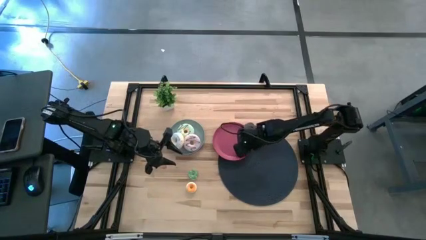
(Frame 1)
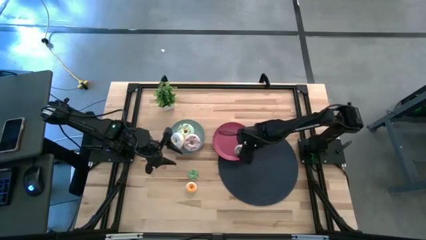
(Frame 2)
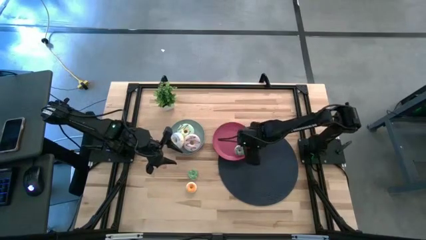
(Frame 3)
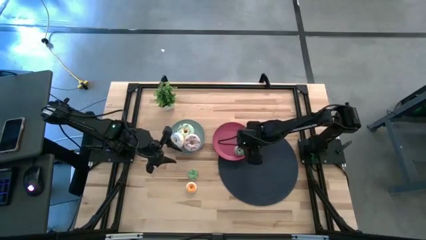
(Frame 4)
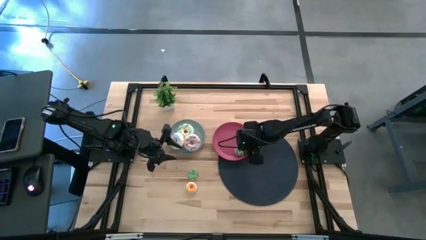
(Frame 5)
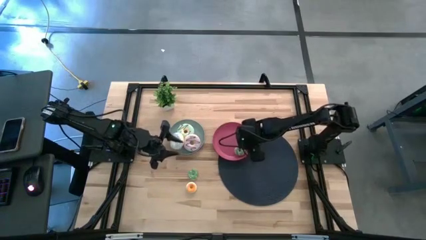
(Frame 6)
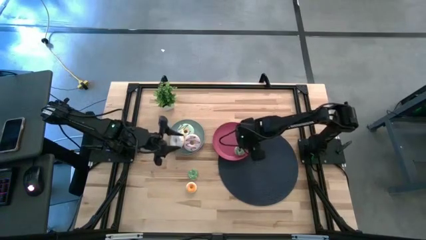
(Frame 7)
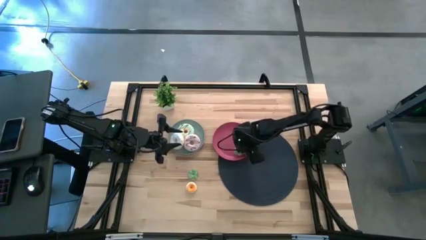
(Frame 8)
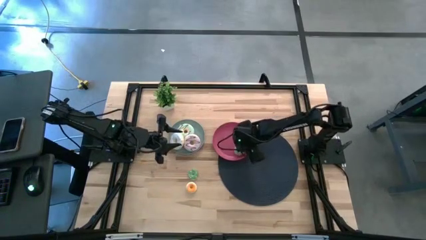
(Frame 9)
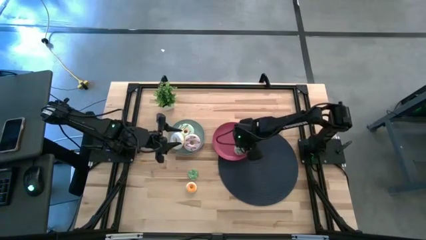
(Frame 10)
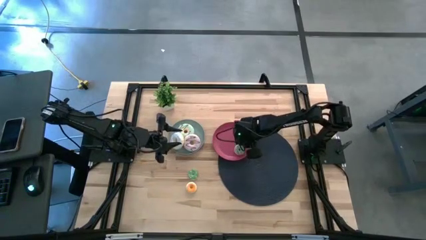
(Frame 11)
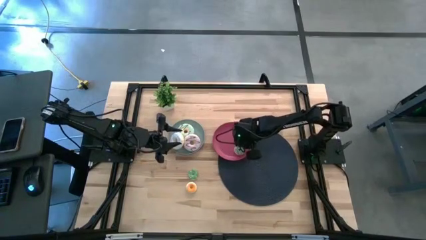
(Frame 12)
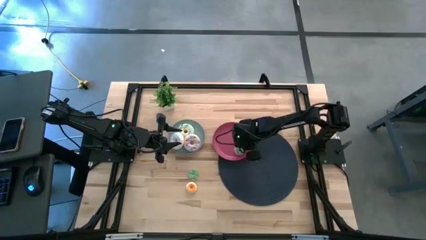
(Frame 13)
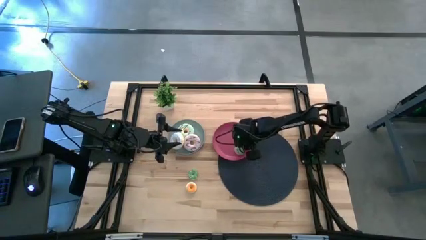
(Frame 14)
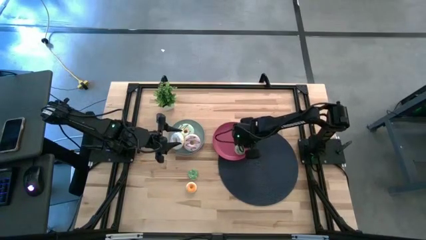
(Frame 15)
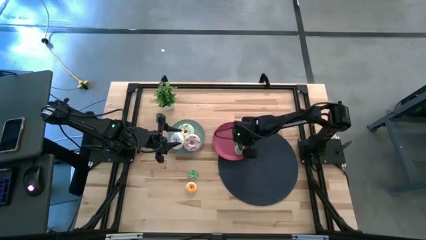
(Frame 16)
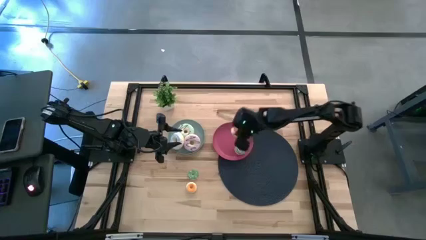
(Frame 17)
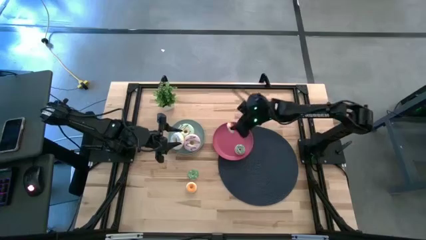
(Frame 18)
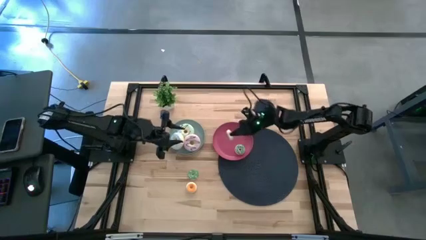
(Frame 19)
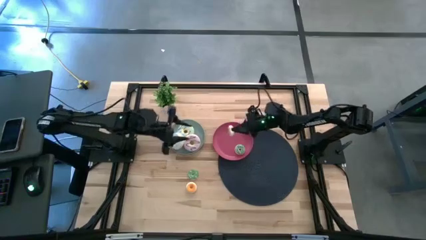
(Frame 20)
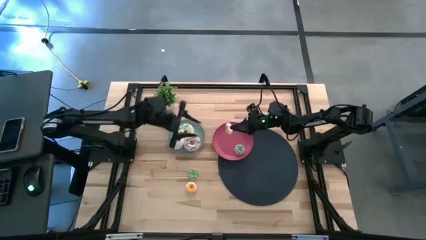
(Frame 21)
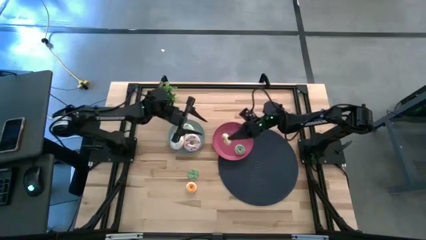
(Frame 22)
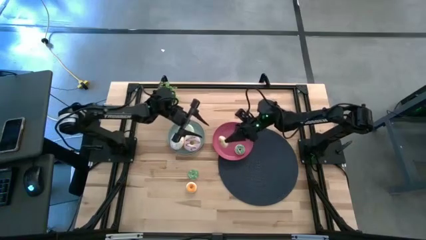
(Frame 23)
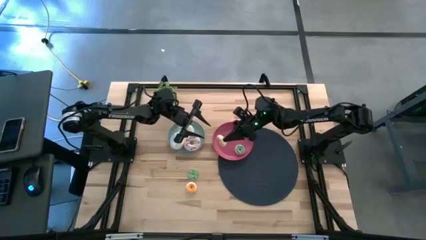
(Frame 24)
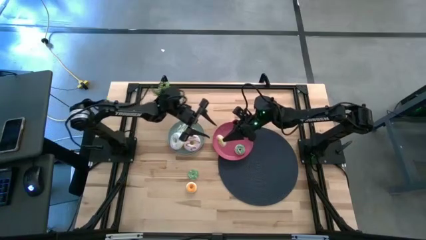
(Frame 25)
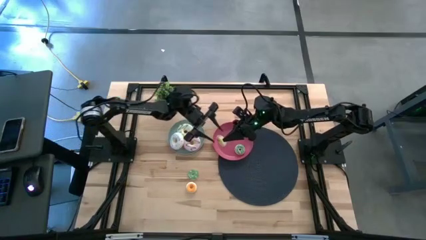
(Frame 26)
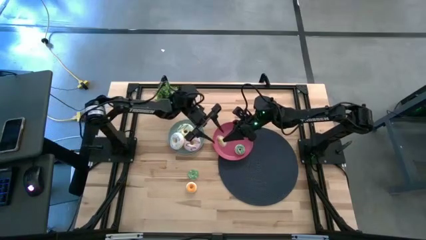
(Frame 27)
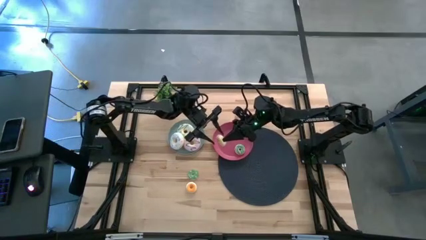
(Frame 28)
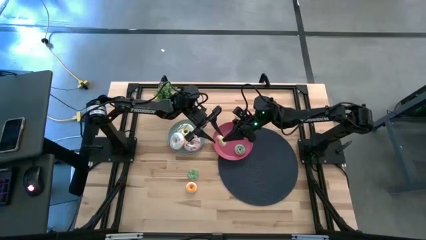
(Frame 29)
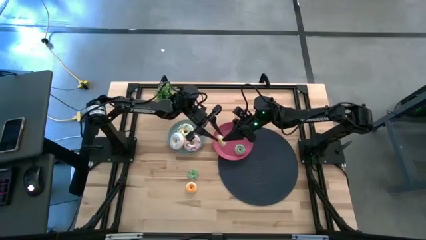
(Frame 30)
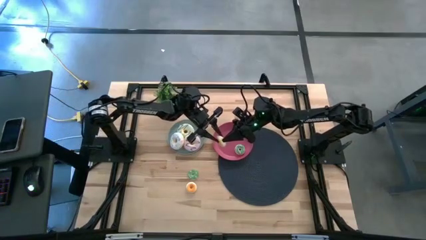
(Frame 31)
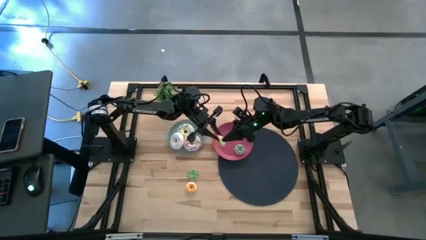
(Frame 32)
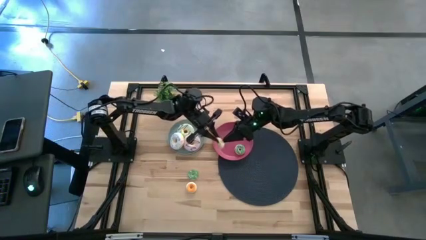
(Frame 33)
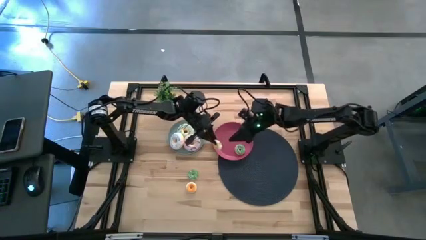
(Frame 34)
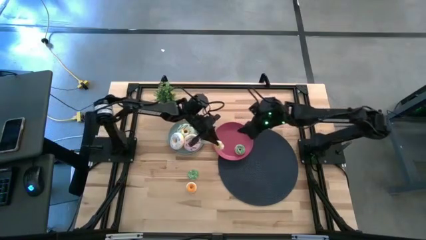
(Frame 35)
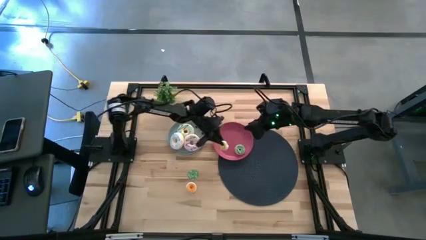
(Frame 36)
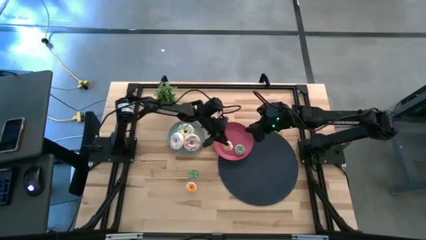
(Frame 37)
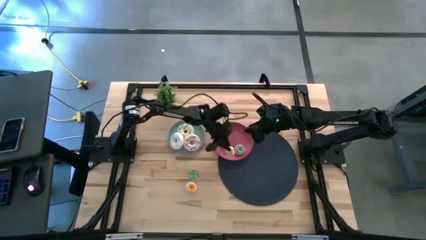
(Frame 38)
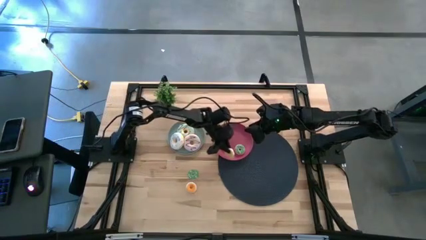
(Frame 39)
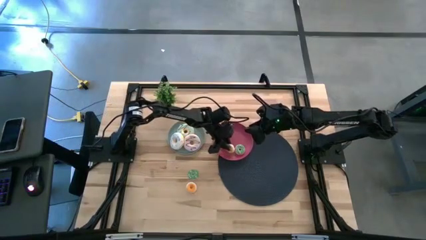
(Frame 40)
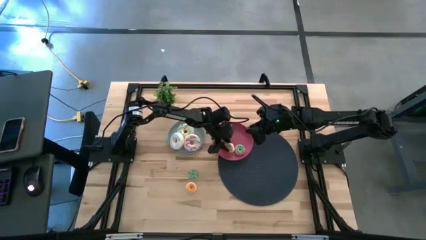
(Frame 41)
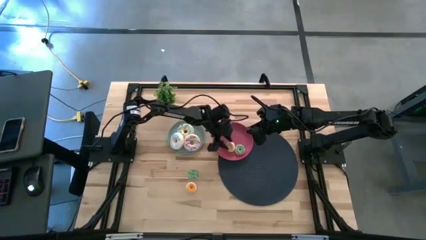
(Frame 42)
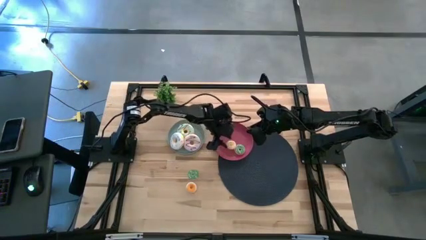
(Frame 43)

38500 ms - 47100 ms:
Task: Pick & Place donuts
Adjust the yellow donut on the red plate

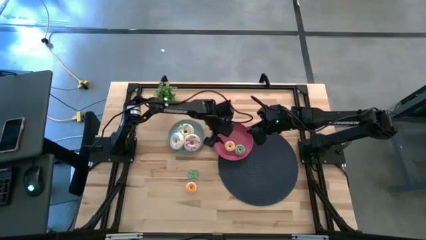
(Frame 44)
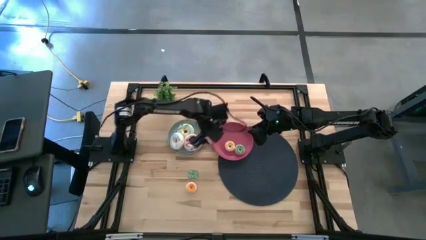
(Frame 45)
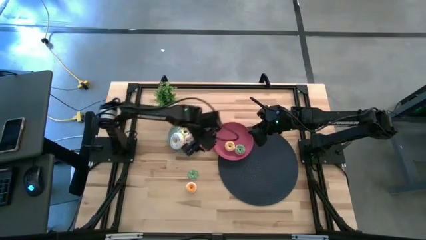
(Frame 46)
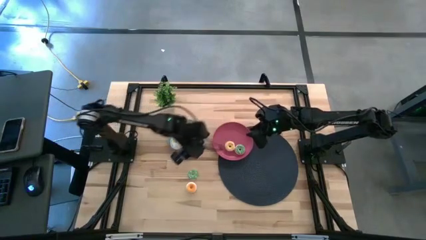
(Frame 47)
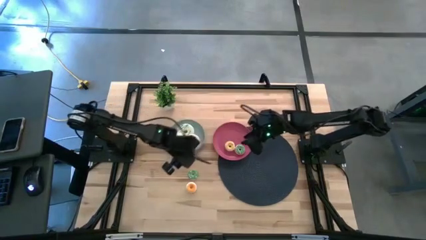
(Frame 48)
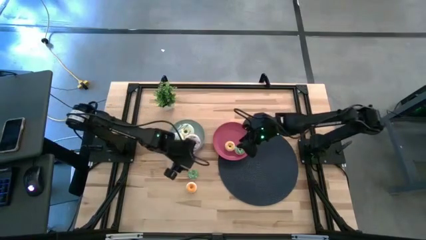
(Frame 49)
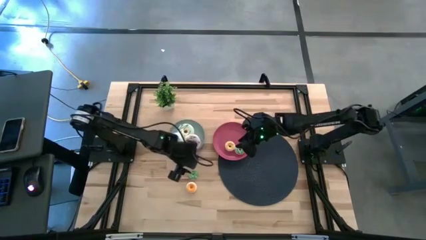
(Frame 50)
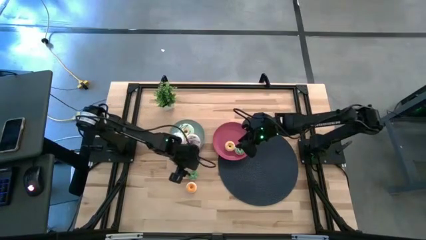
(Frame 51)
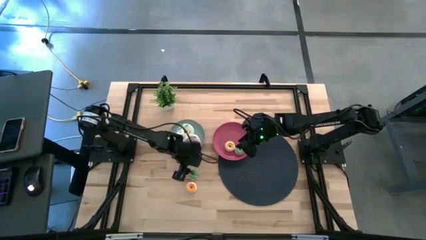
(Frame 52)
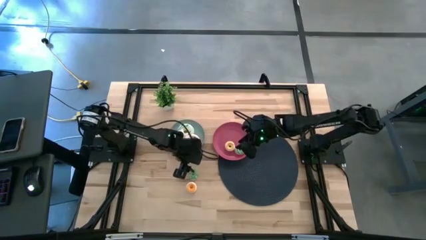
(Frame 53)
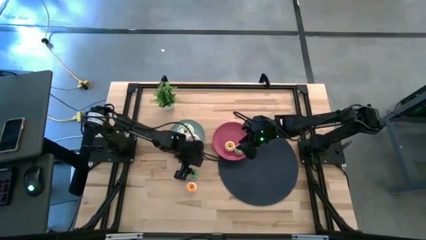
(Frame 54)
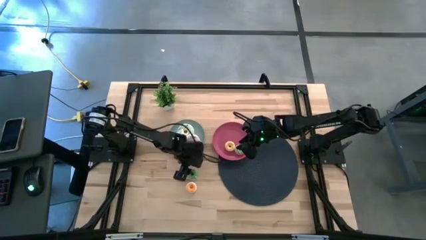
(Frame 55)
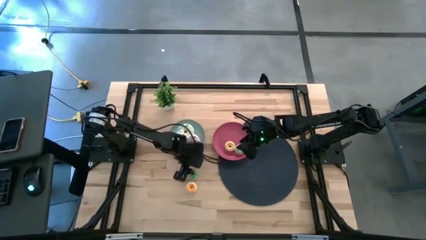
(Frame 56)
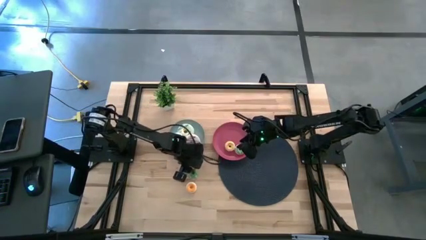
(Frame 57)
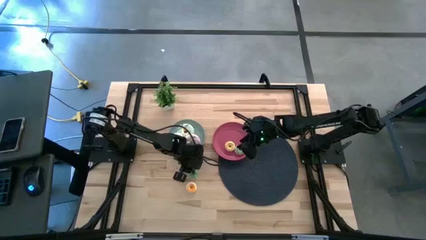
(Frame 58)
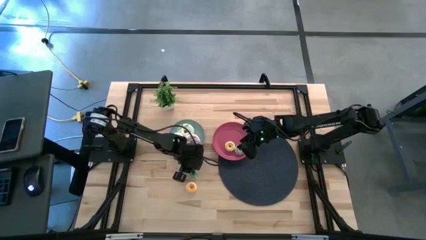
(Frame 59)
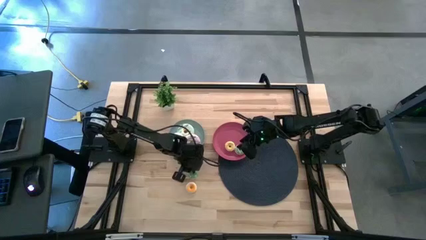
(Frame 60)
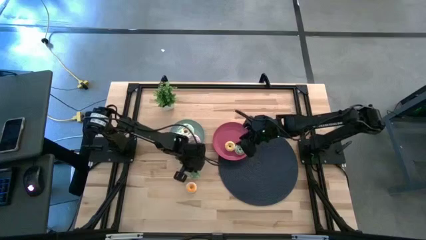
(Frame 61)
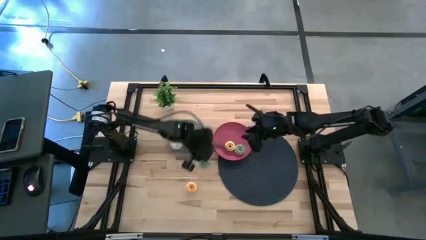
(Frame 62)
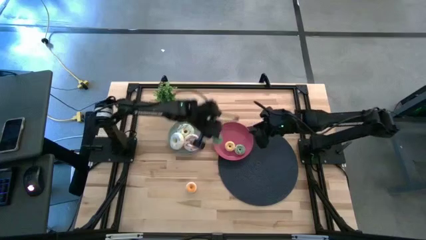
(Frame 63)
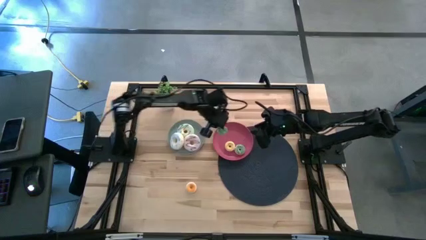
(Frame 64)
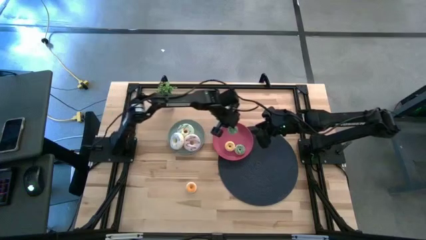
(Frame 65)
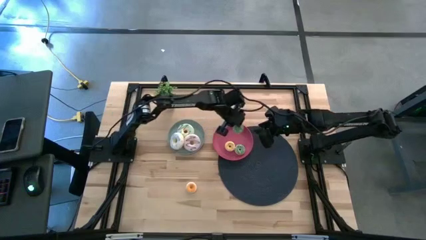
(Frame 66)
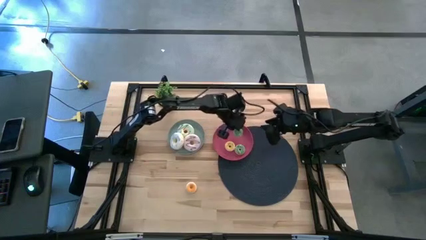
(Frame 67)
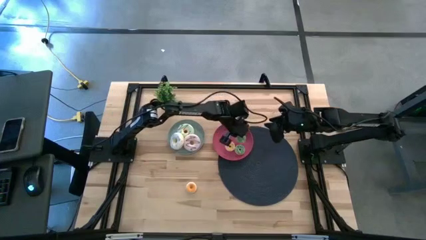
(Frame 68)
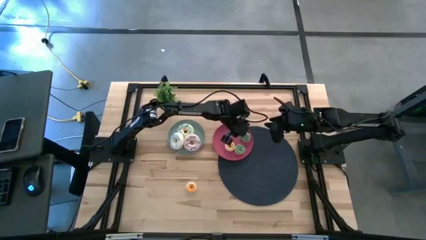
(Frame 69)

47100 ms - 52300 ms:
Put the small green donut on the red plate

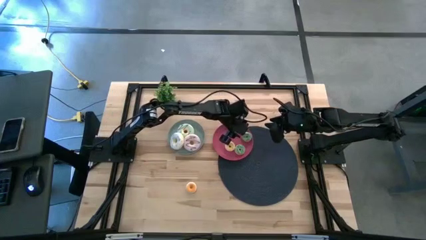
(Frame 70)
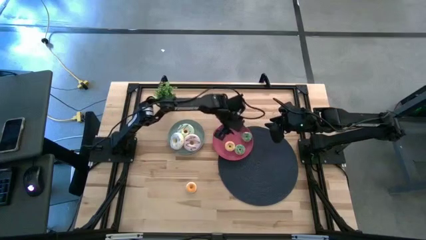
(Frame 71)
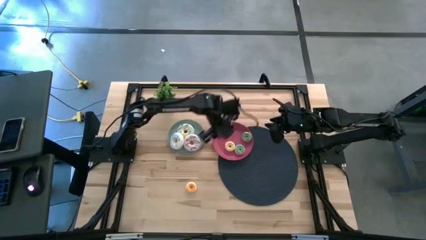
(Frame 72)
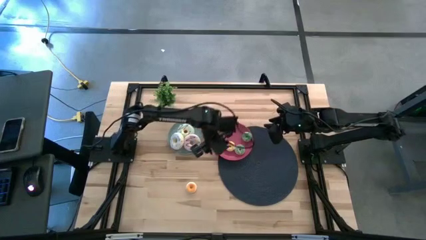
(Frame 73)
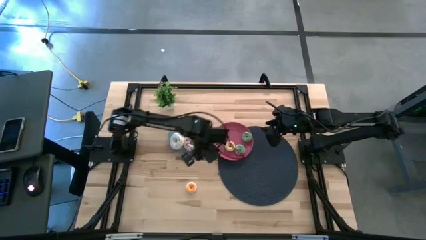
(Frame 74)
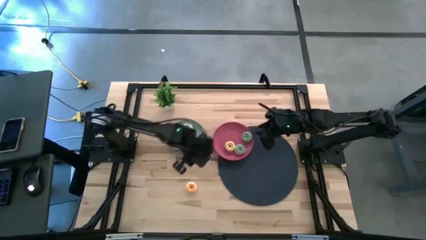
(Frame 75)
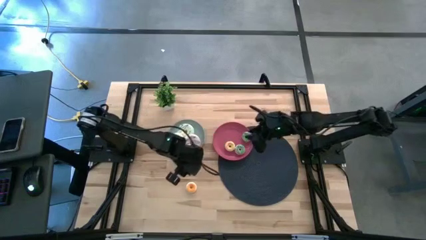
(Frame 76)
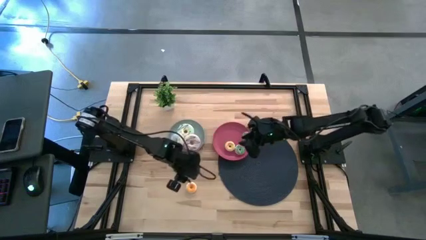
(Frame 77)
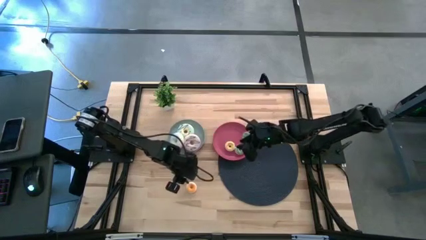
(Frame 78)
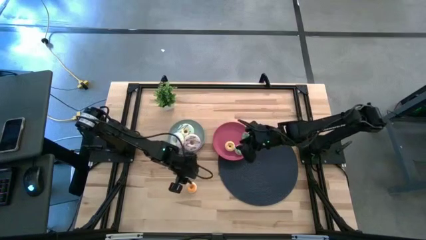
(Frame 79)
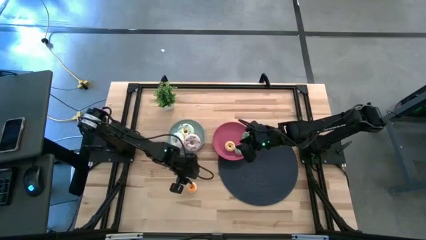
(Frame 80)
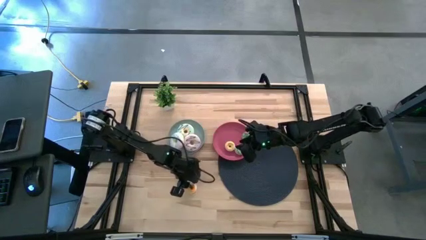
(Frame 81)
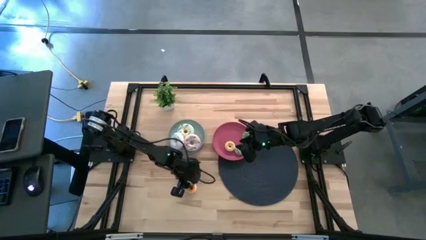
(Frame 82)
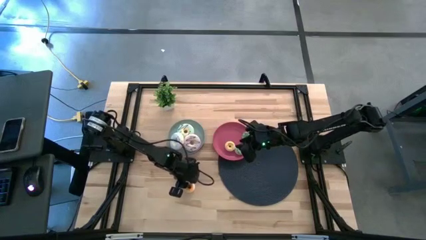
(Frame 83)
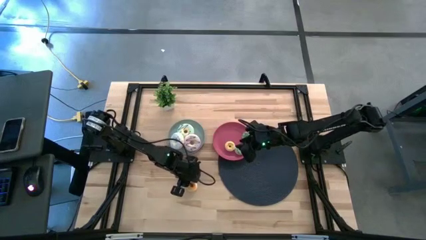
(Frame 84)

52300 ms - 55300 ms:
Put the small red donut on the red plate
